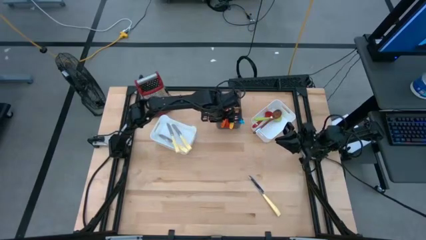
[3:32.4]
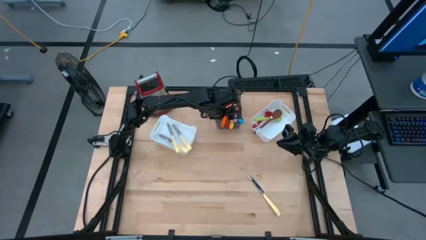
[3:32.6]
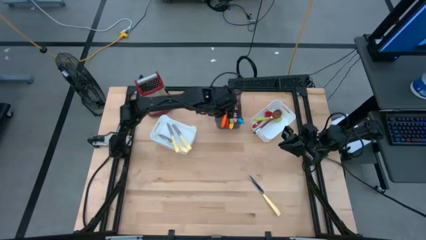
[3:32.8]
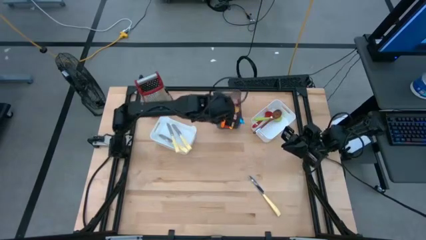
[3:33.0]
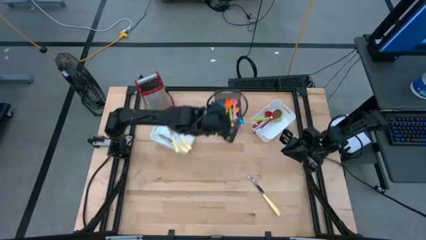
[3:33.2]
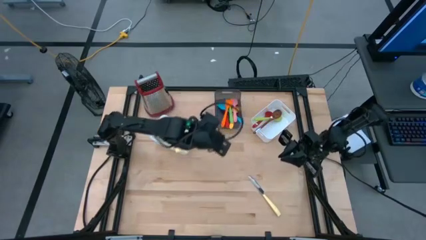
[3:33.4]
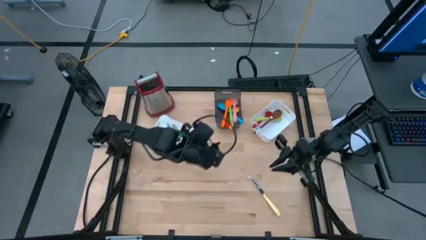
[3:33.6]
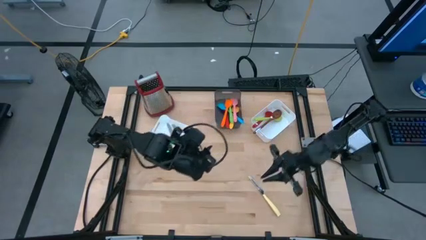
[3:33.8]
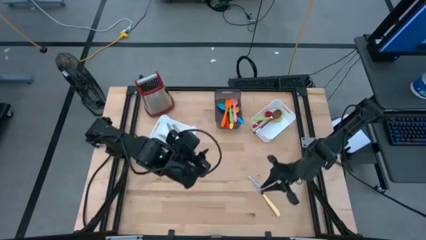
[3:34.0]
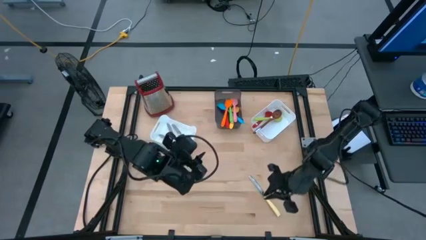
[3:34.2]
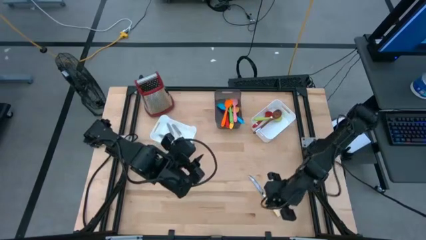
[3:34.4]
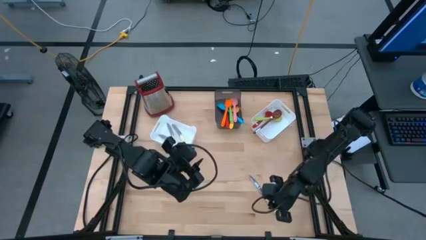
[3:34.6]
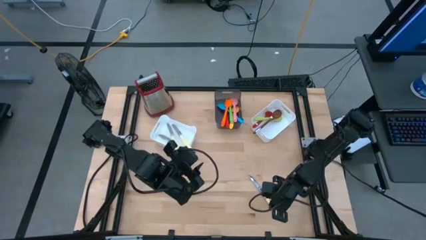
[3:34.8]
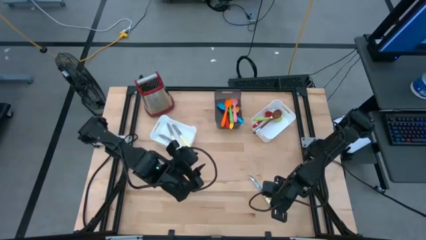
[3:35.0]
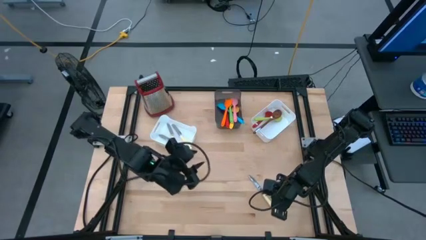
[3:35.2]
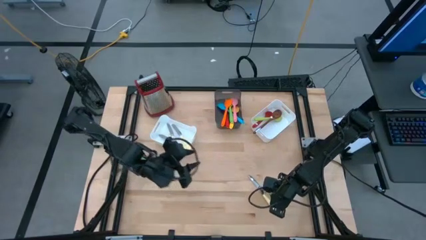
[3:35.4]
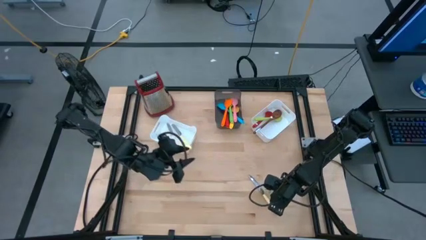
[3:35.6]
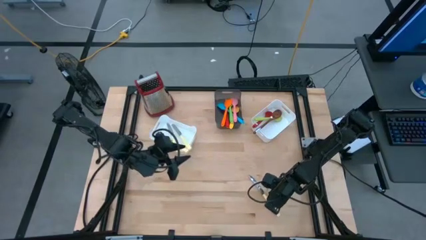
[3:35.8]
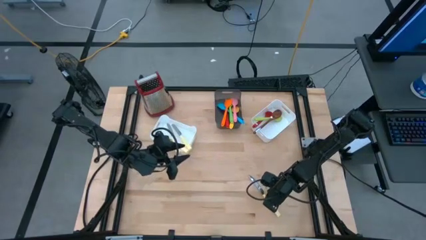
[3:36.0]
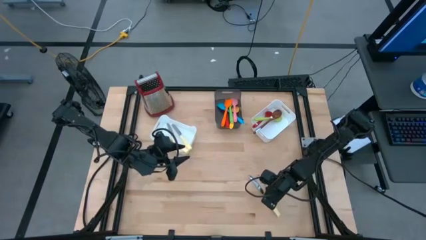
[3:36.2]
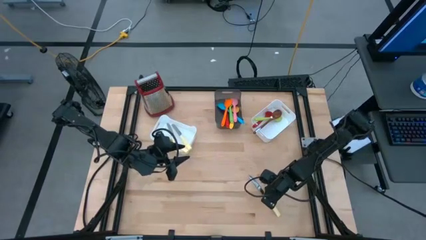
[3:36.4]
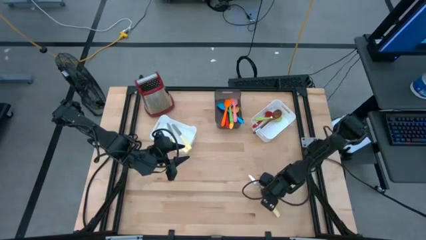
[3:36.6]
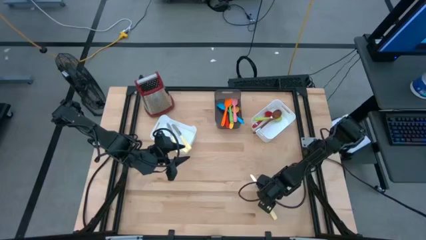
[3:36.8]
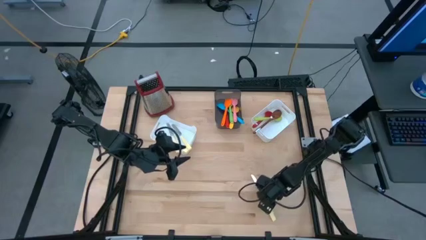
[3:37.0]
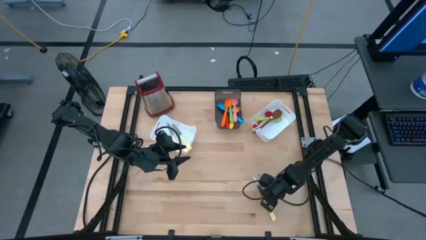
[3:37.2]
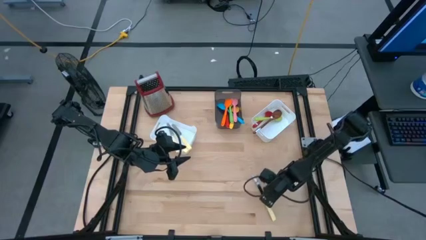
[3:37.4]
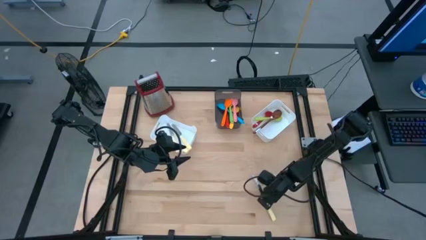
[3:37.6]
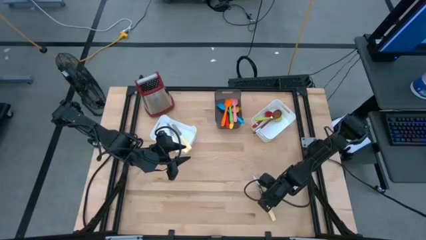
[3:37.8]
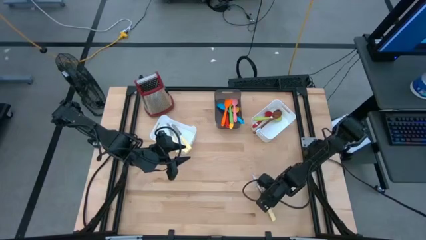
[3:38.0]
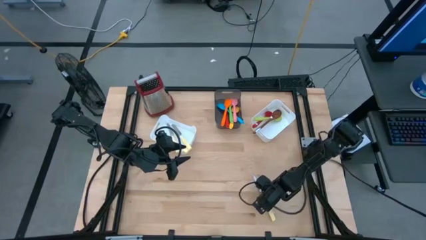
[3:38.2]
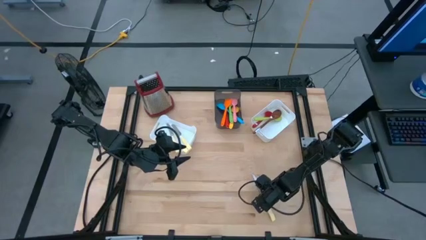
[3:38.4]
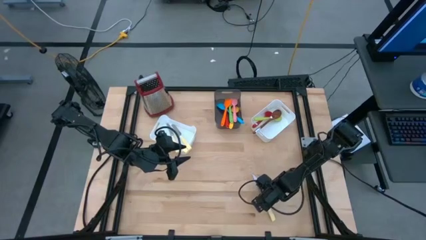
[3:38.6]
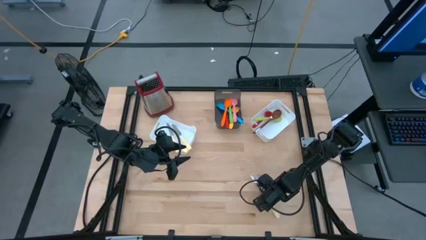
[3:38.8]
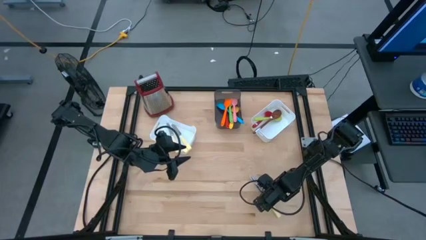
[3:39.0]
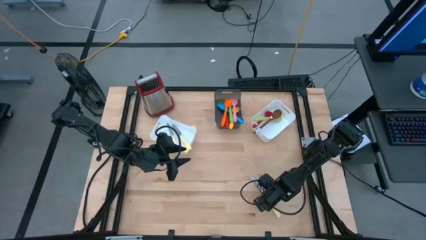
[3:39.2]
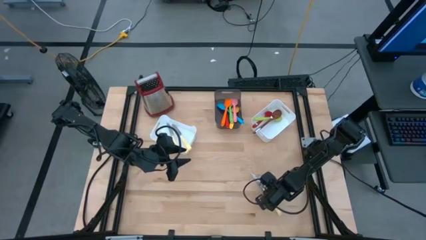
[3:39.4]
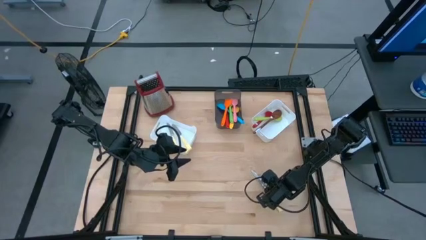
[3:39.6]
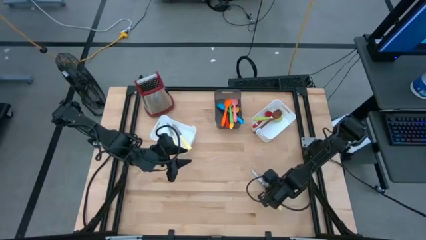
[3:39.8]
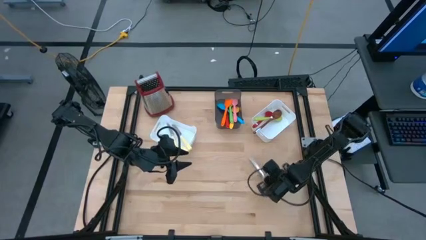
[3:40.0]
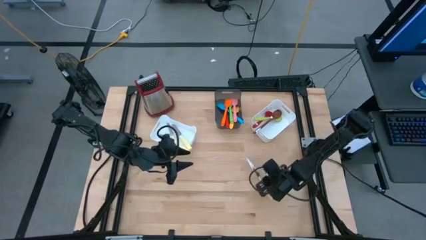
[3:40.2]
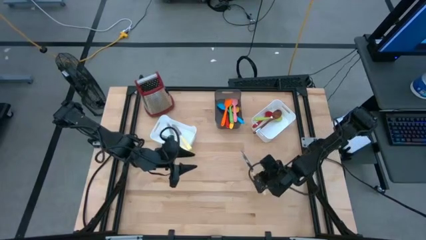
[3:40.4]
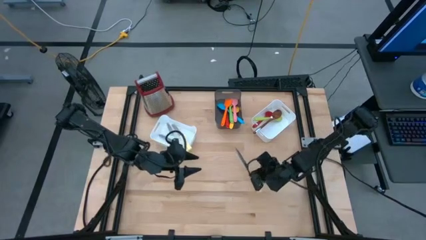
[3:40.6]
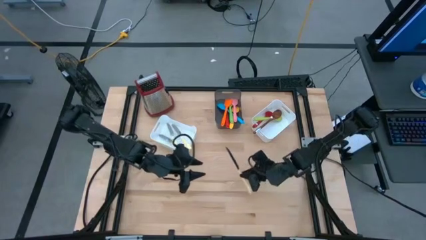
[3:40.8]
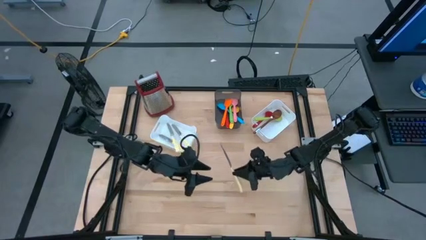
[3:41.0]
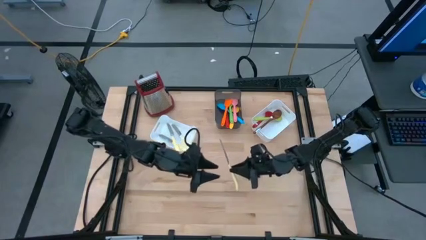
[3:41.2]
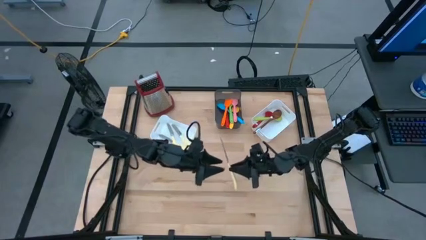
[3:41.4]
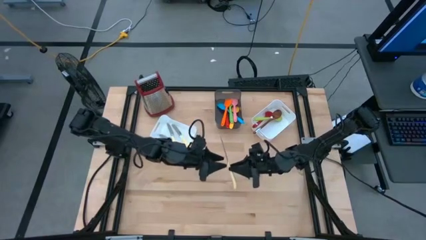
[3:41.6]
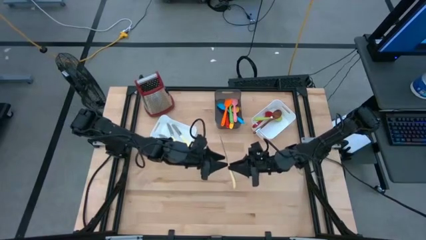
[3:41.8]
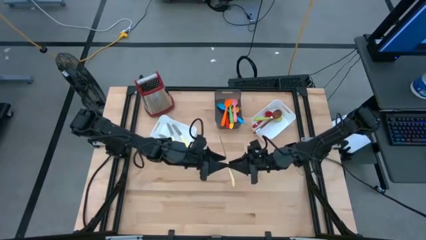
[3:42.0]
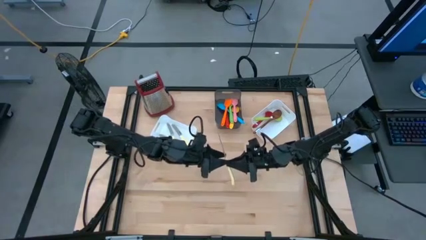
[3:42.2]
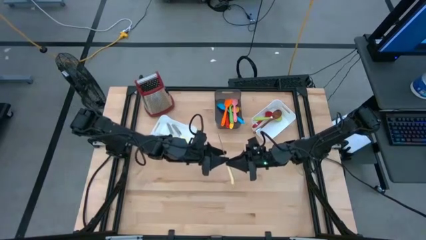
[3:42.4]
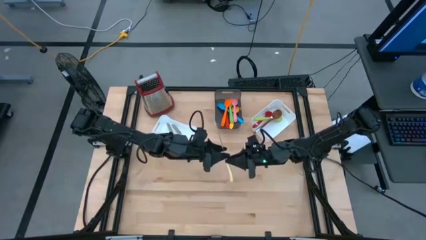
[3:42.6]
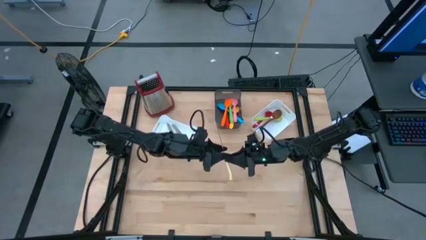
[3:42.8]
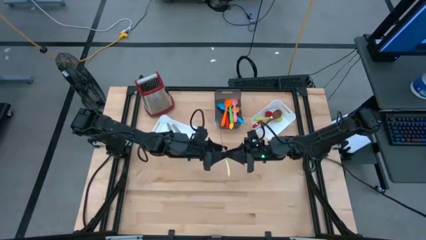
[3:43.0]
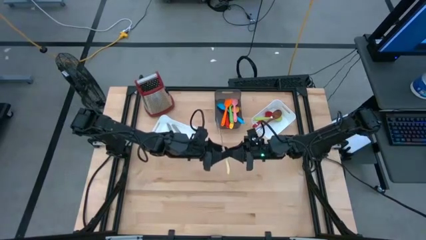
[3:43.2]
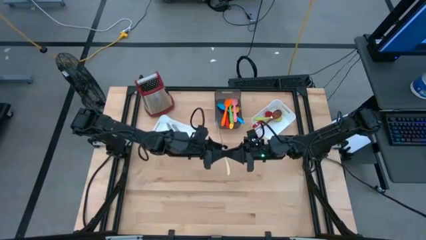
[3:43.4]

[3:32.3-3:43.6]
Task: Pick & Place Kitchen Items
Put the yellow knife into the left white bin
